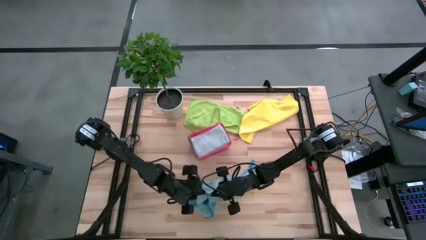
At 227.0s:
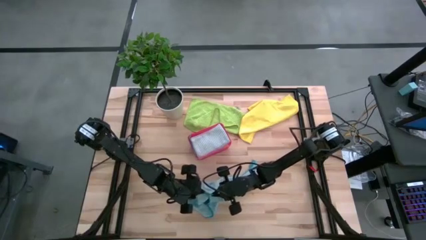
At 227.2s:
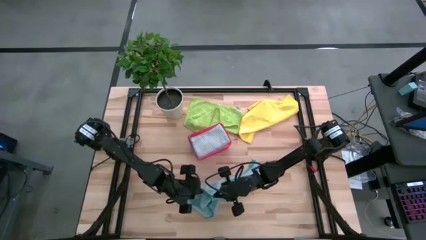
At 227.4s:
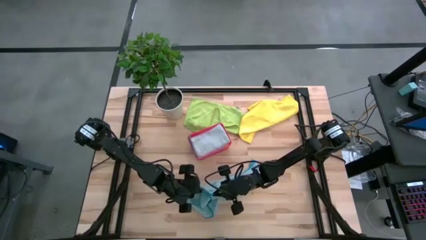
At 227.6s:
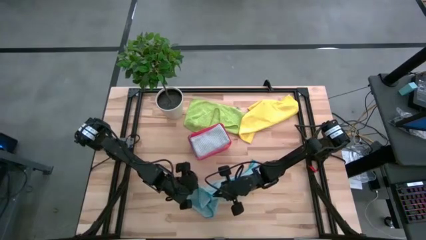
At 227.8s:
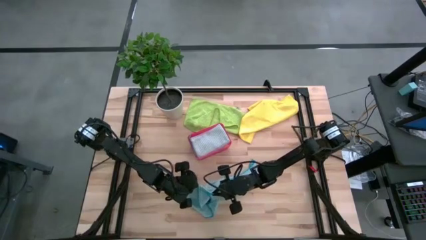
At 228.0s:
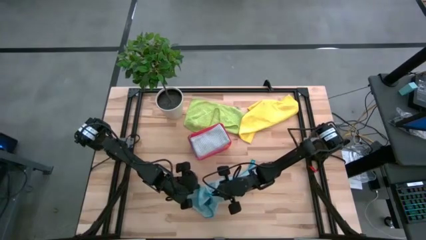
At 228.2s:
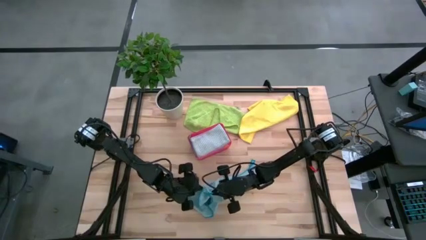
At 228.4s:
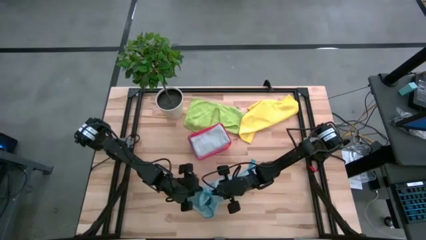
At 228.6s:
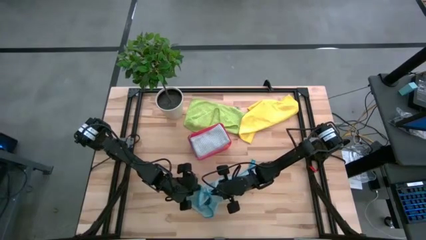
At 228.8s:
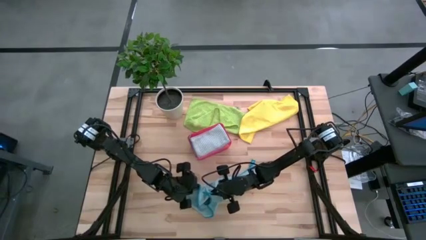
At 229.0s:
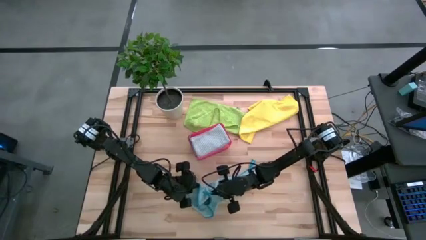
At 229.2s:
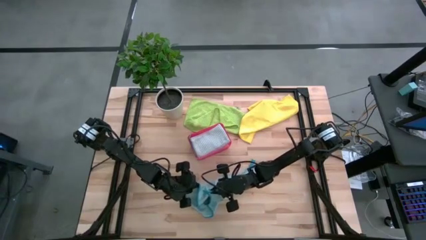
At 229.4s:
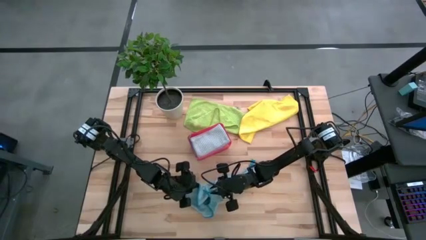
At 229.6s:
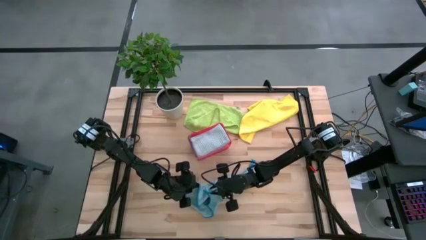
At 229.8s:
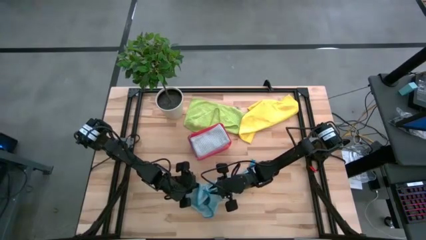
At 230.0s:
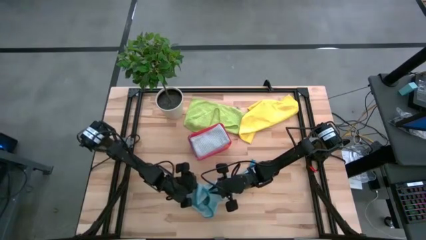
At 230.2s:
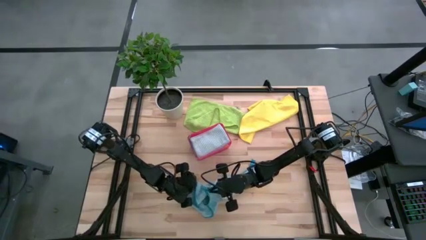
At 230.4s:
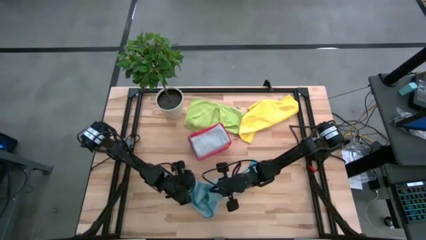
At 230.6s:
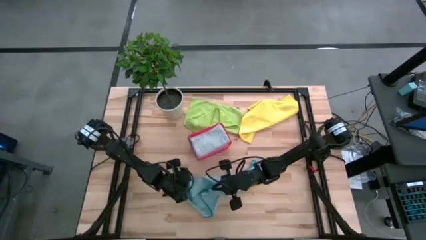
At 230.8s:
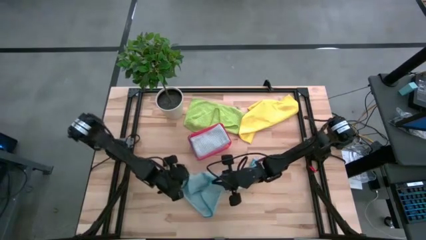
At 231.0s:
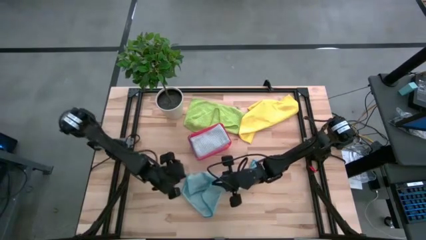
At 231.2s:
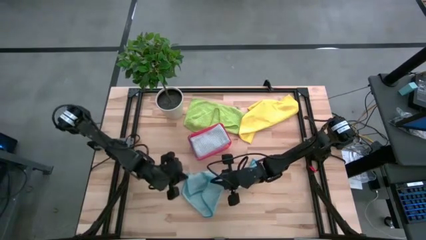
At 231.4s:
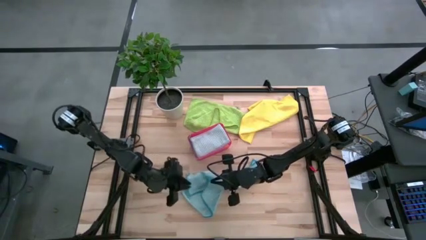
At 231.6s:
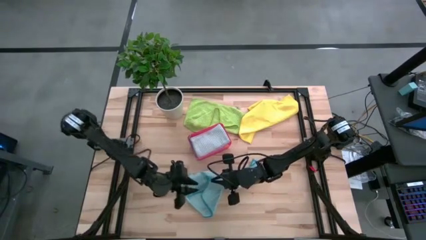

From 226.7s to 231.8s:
Task: Fold microfiber towels
Fold the blue microfiber cloth

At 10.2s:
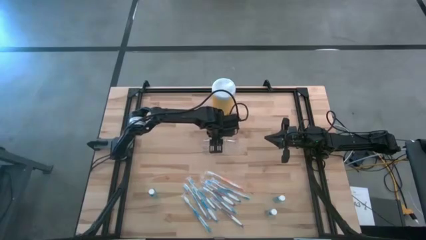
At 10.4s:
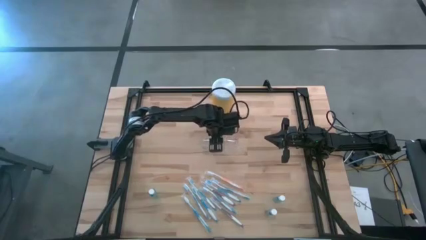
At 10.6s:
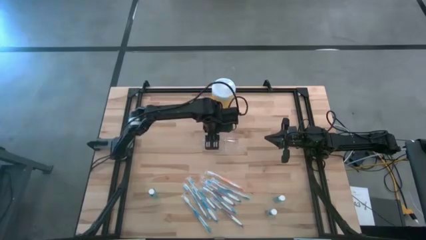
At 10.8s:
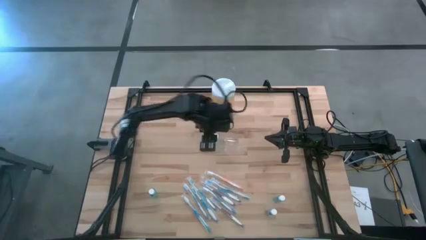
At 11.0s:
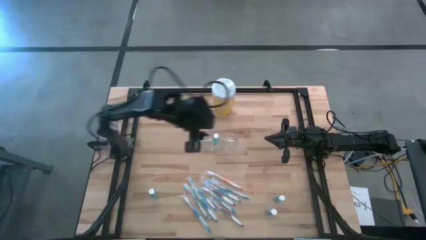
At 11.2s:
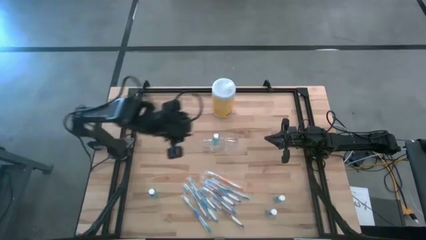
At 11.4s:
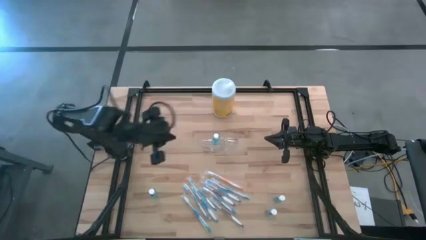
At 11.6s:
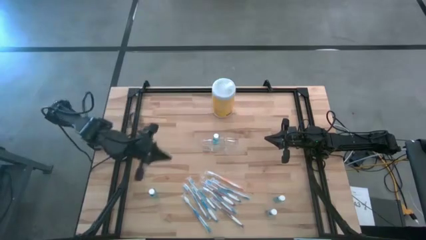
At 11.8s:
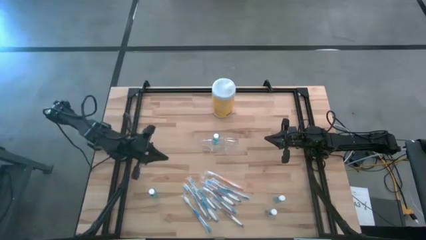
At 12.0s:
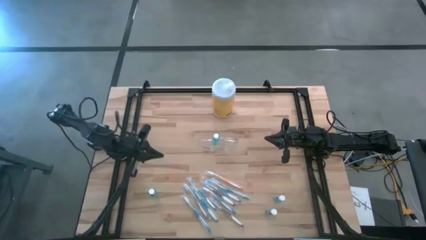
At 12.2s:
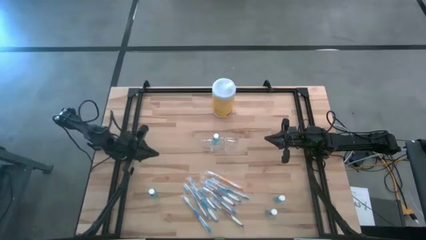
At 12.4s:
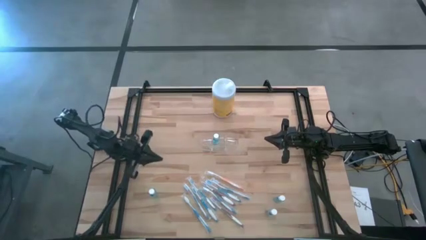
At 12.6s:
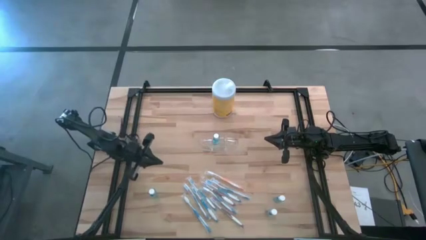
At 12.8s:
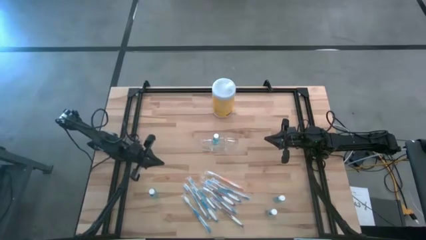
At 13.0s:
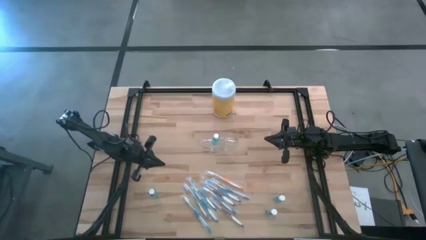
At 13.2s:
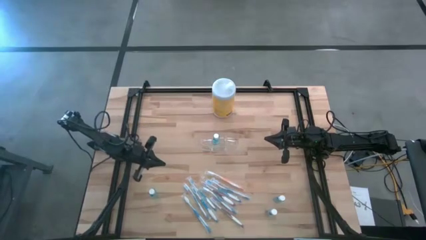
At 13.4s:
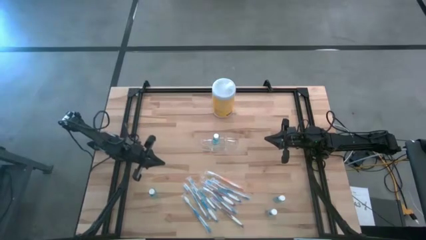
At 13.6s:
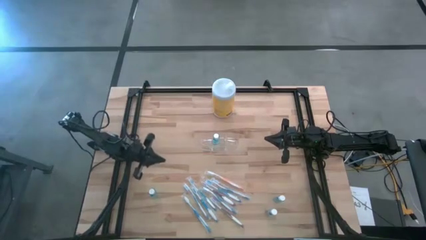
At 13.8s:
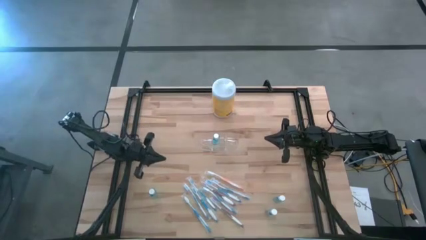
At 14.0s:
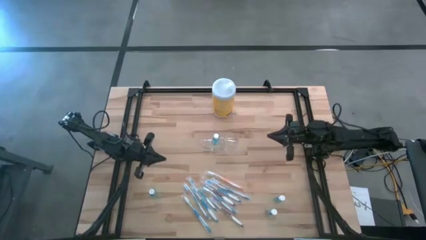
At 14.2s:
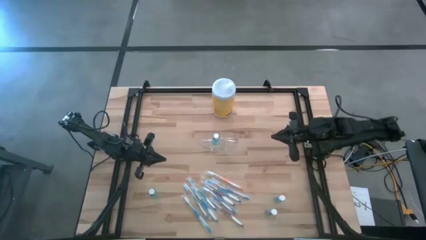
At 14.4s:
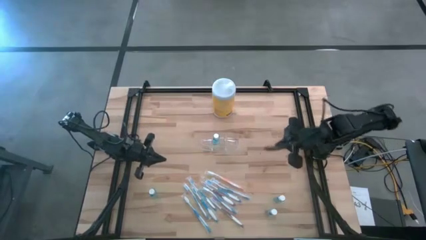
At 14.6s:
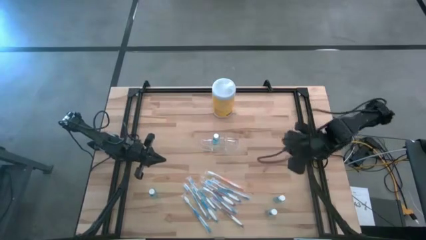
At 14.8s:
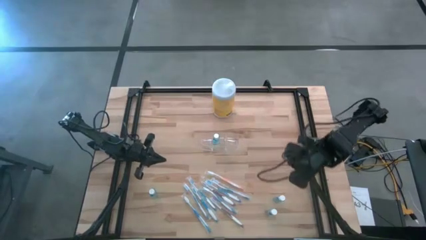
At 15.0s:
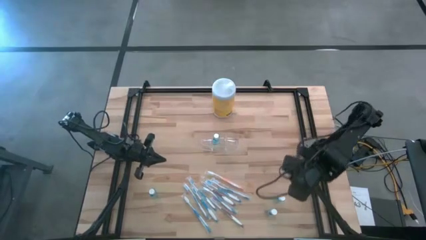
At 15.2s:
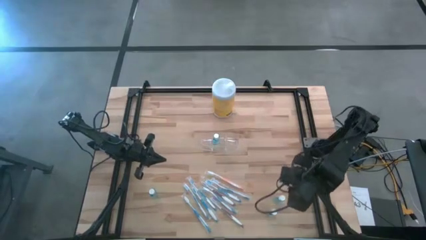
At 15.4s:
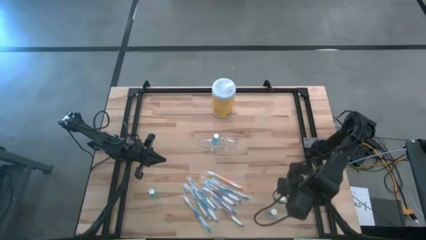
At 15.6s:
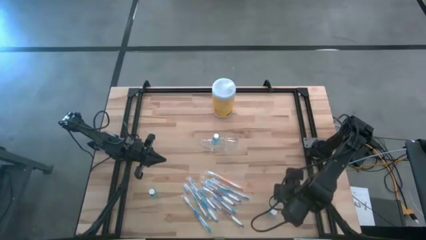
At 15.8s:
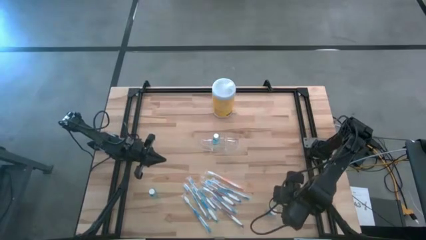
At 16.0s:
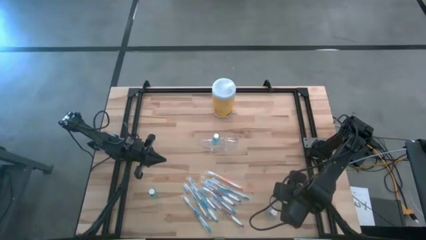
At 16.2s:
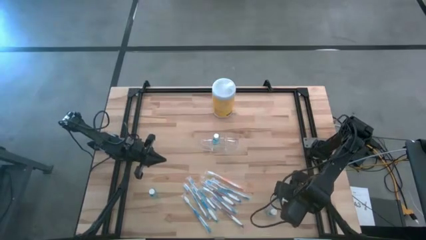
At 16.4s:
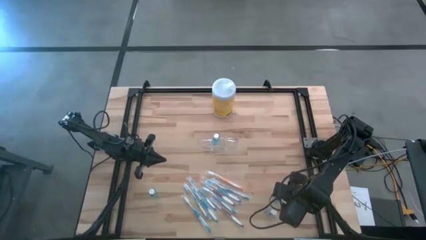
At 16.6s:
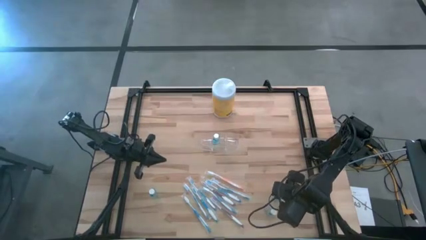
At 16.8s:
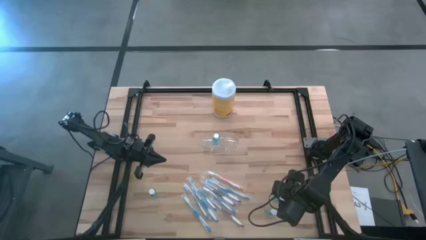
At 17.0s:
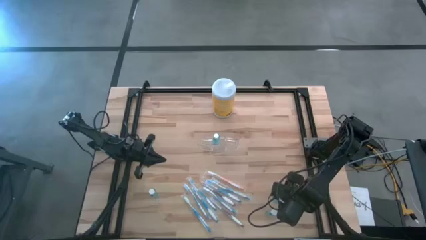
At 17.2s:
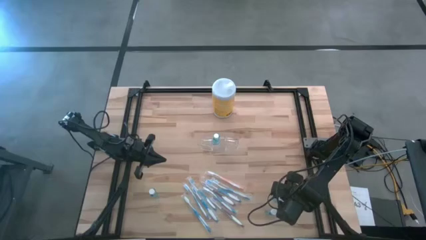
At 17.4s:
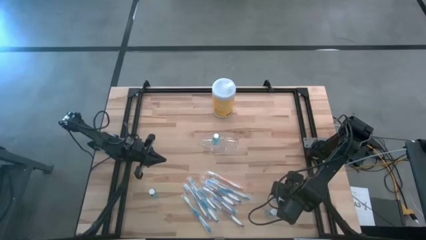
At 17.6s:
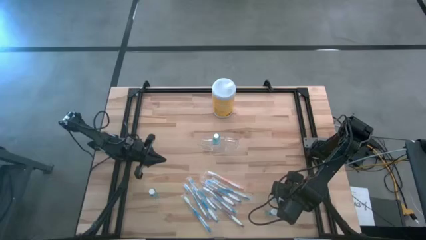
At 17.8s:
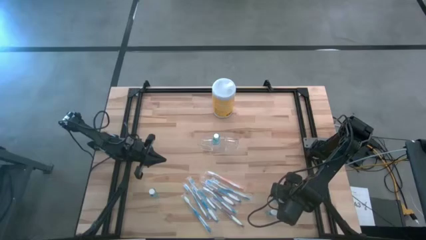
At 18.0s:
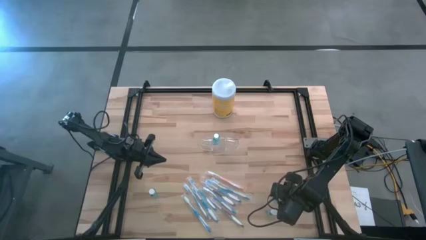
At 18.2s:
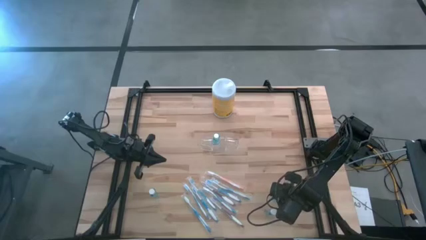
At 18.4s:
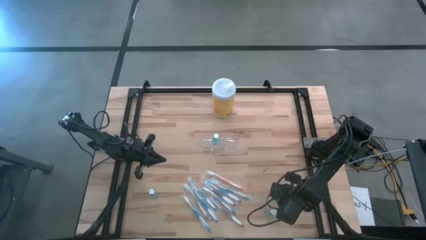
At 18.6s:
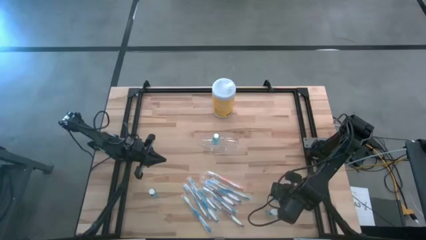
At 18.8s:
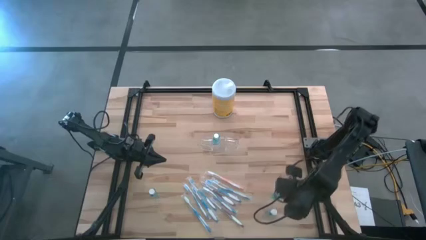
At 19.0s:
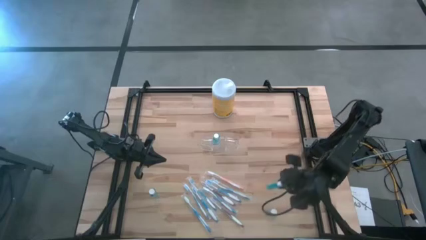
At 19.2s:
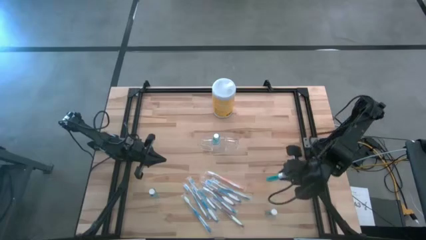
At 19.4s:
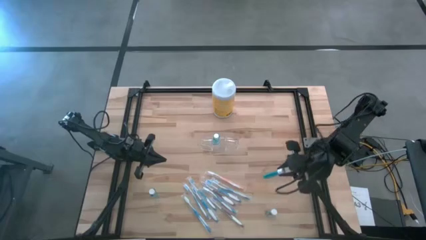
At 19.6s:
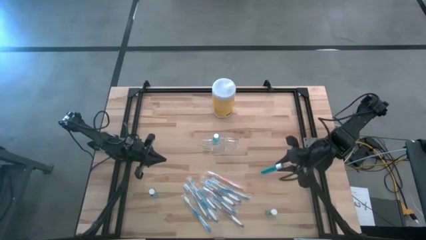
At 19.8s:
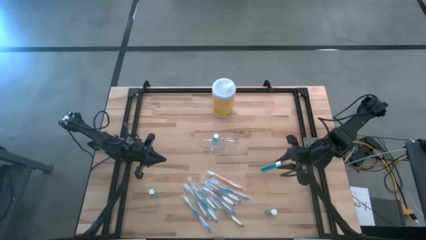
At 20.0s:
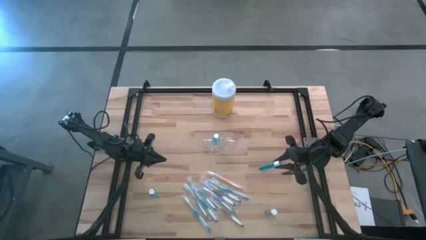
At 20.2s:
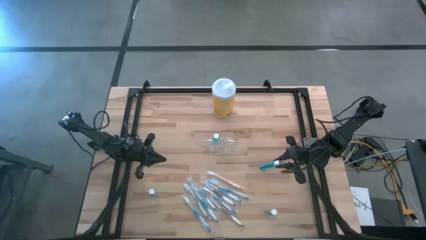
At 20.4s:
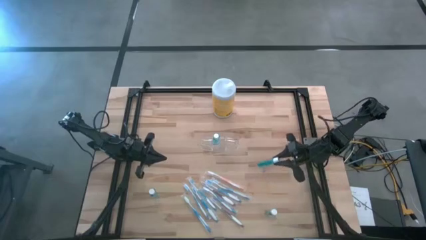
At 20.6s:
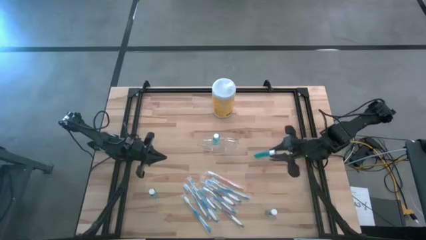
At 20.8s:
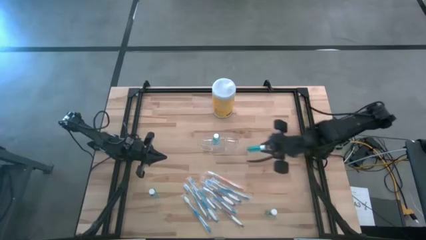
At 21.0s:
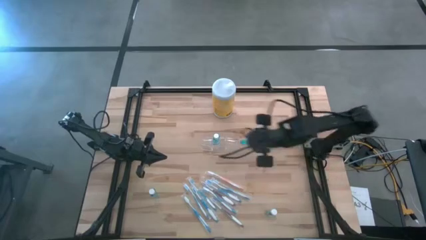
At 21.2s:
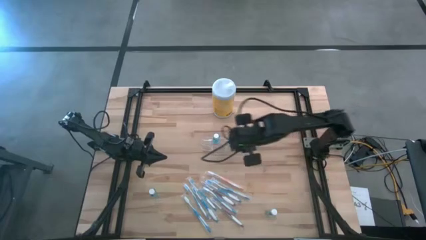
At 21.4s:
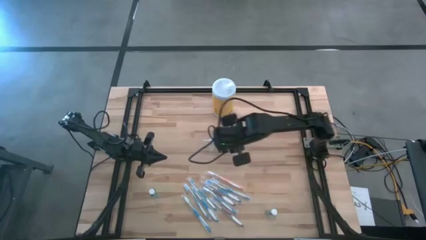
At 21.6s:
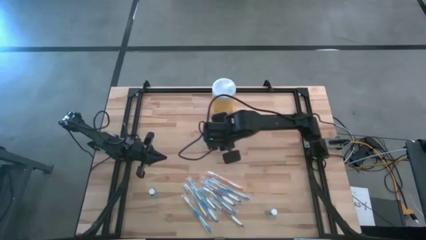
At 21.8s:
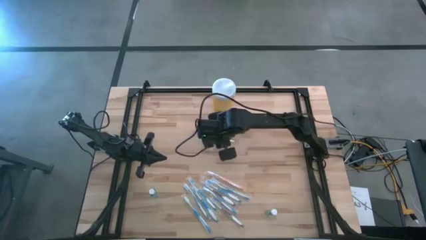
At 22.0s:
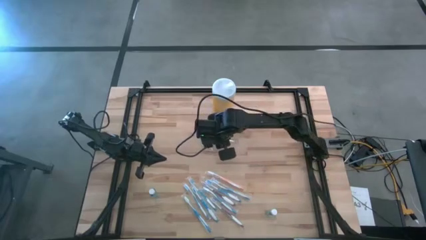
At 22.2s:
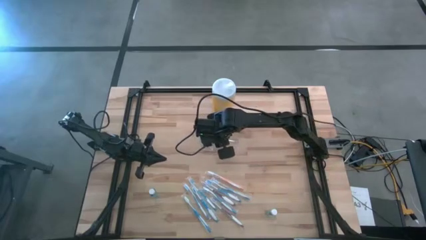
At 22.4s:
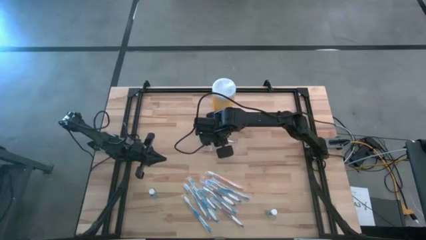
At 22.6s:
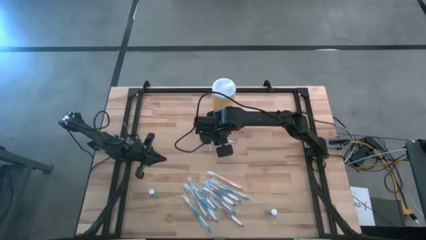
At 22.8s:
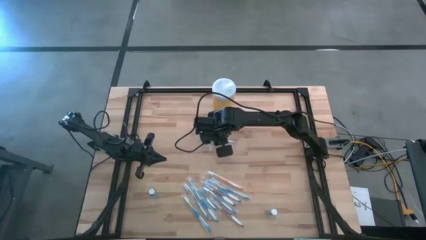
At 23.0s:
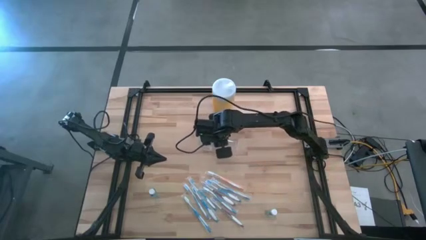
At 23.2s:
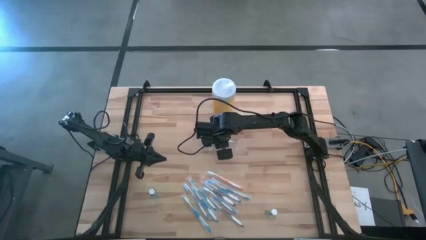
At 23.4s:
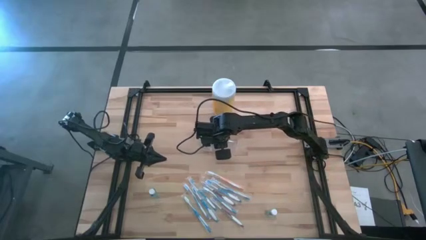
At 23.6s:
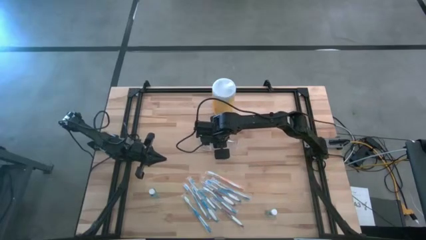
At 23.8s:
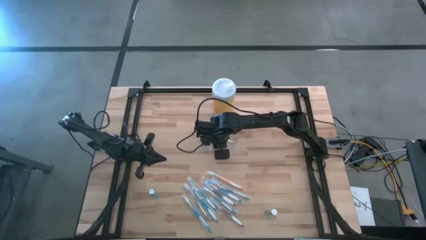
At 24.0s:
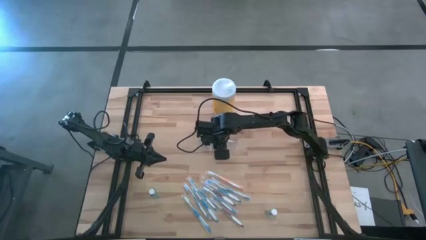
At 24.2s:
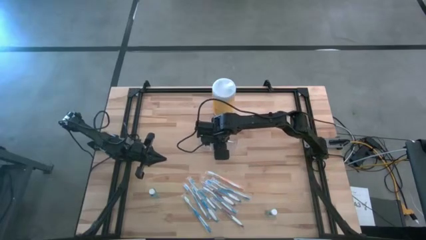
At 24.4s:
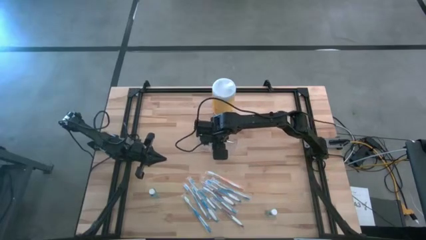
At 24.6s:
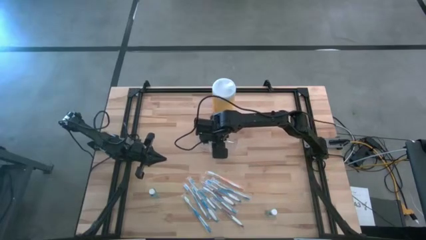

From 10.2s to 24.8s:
Task: Pick & Place toothbrushing station
Put the mouthwash into the transparent organizer
